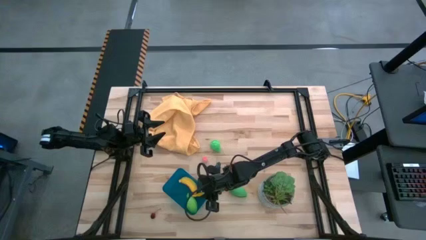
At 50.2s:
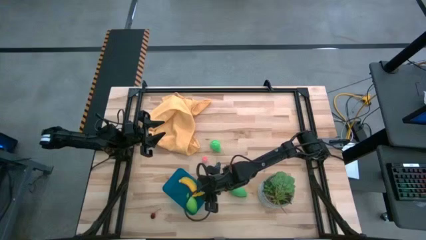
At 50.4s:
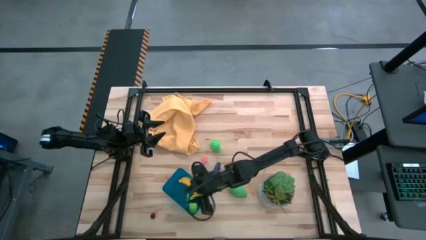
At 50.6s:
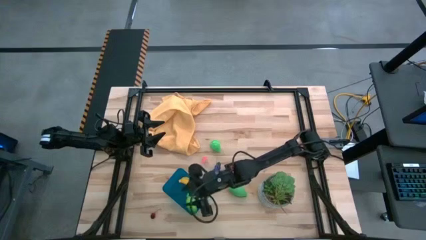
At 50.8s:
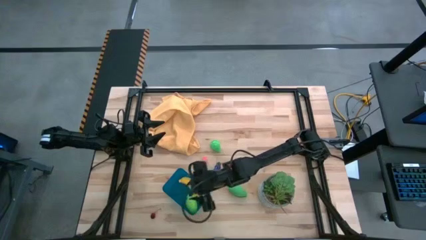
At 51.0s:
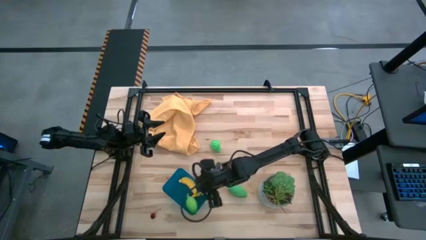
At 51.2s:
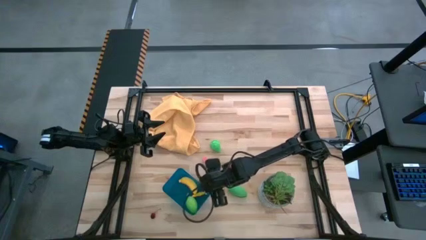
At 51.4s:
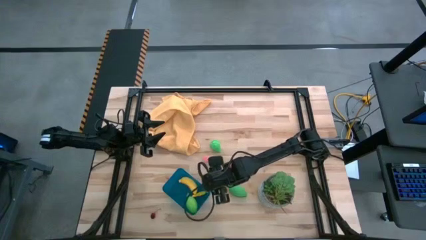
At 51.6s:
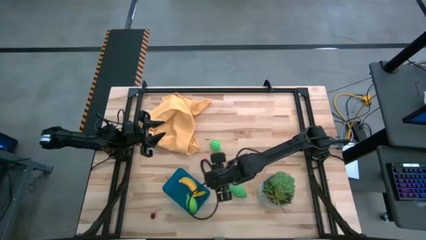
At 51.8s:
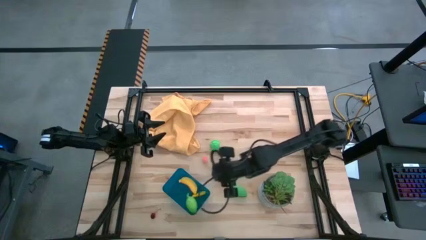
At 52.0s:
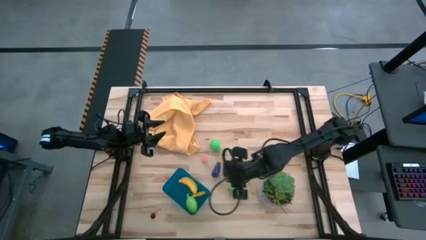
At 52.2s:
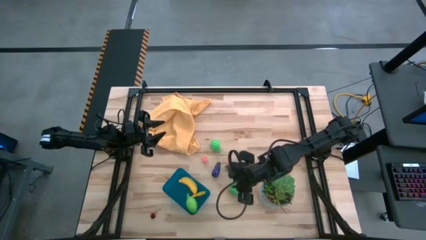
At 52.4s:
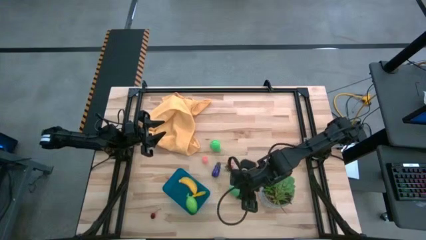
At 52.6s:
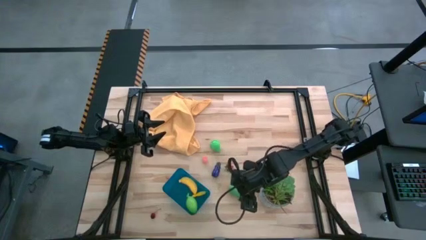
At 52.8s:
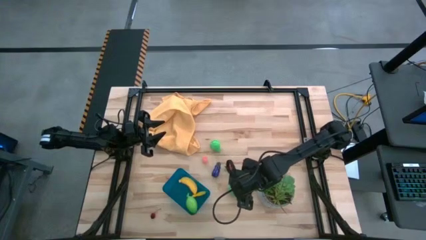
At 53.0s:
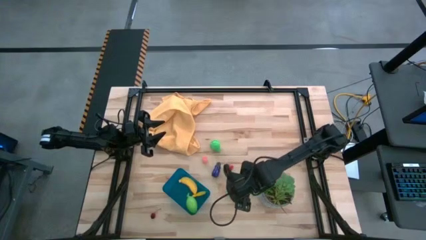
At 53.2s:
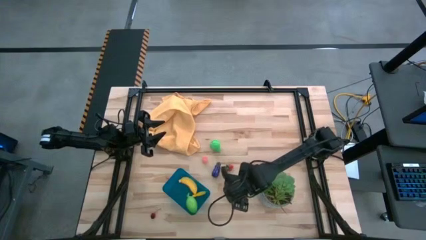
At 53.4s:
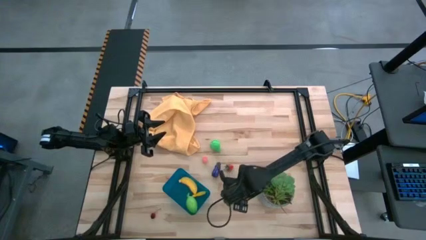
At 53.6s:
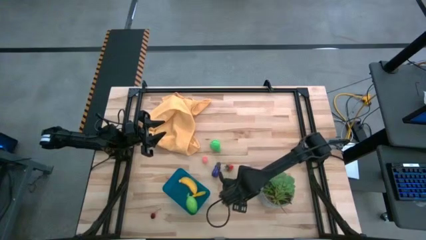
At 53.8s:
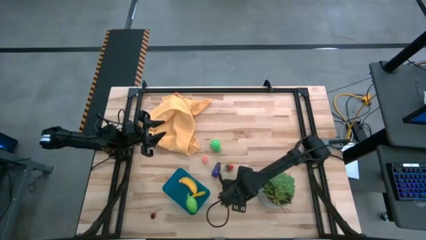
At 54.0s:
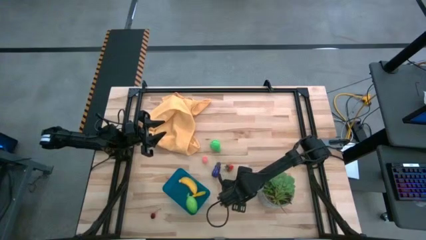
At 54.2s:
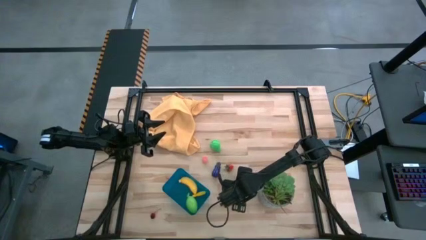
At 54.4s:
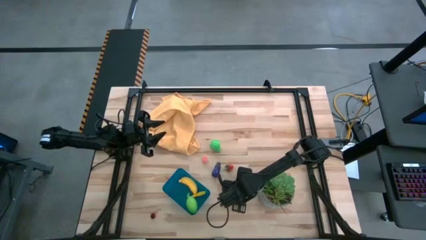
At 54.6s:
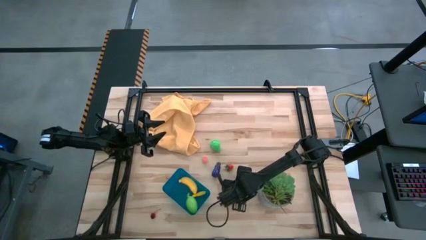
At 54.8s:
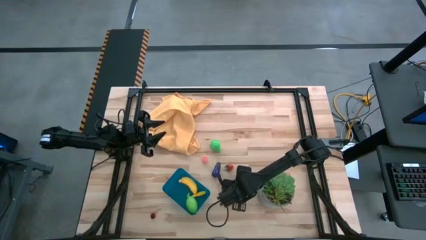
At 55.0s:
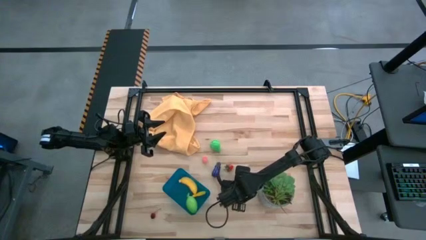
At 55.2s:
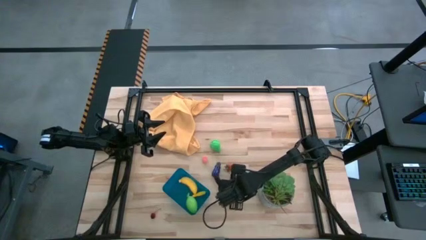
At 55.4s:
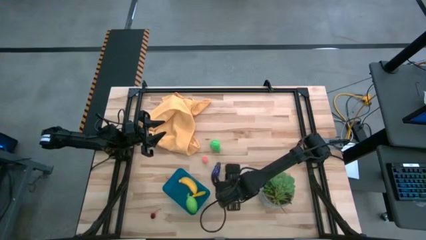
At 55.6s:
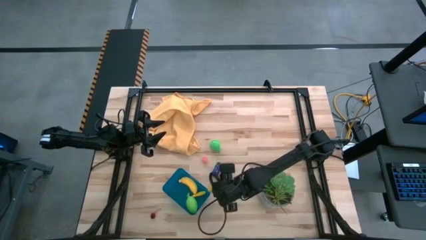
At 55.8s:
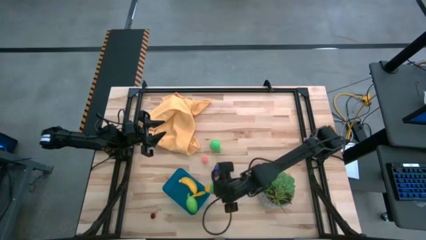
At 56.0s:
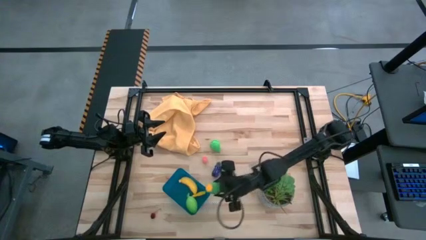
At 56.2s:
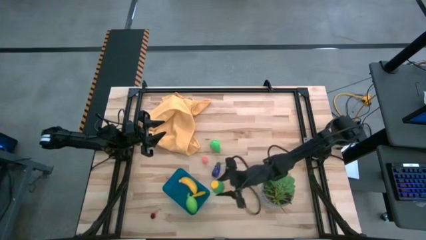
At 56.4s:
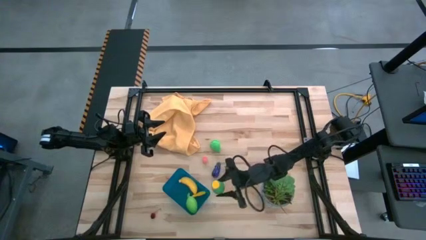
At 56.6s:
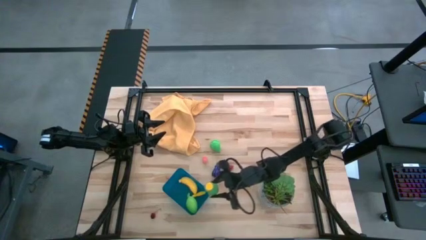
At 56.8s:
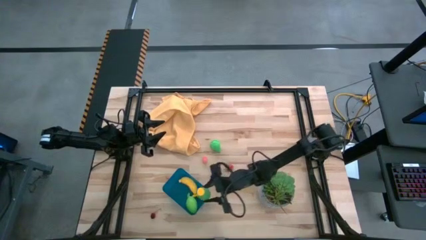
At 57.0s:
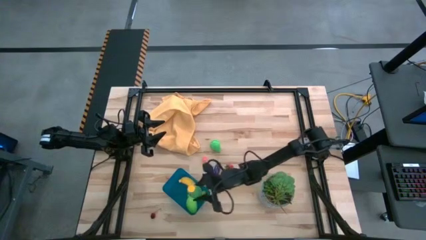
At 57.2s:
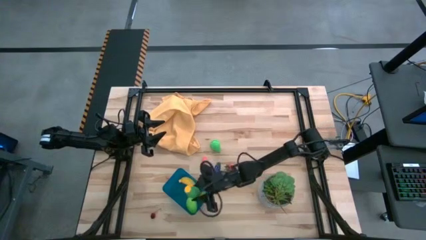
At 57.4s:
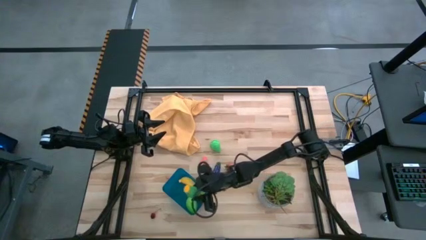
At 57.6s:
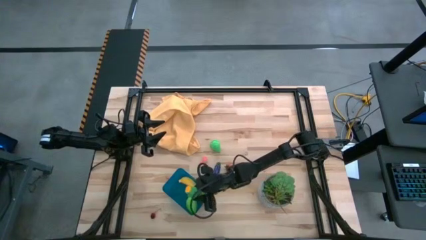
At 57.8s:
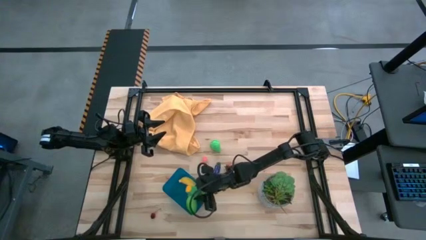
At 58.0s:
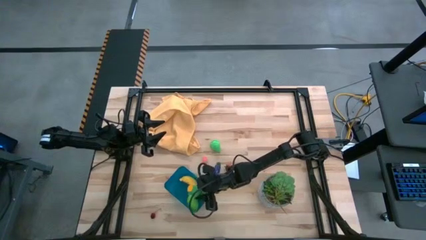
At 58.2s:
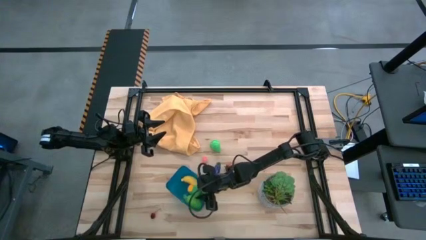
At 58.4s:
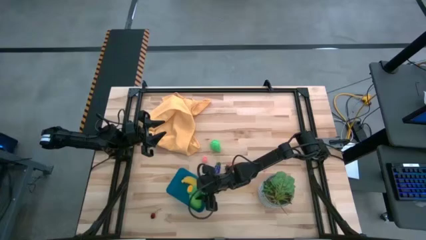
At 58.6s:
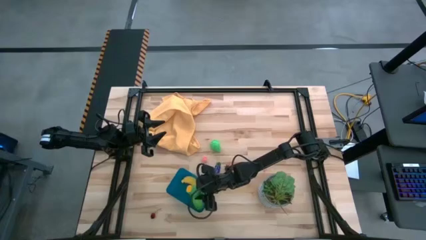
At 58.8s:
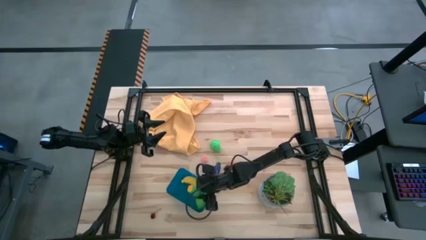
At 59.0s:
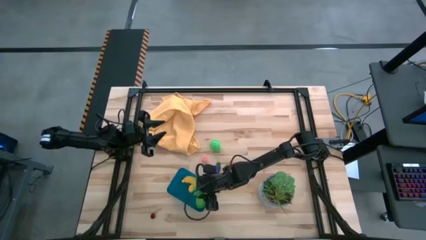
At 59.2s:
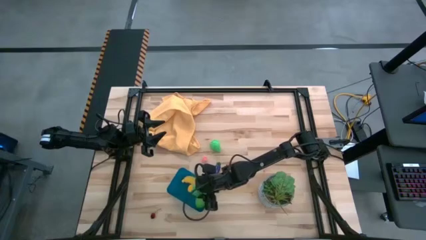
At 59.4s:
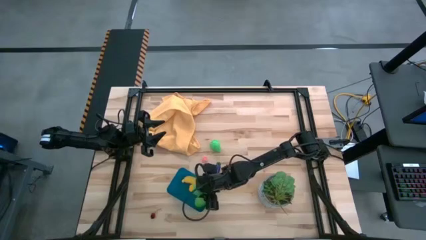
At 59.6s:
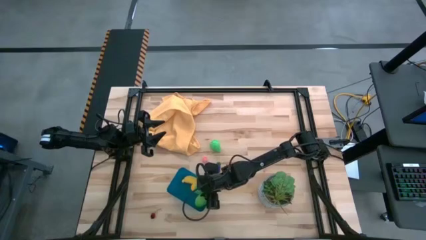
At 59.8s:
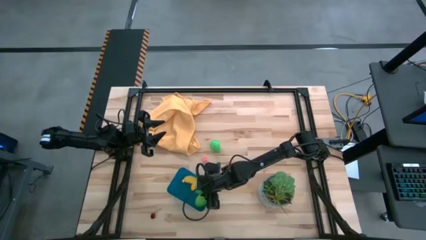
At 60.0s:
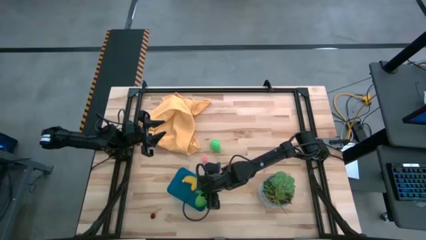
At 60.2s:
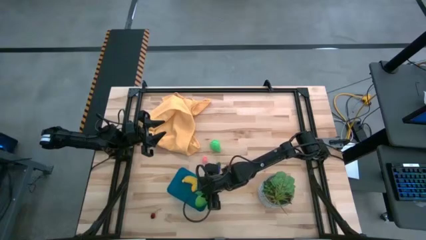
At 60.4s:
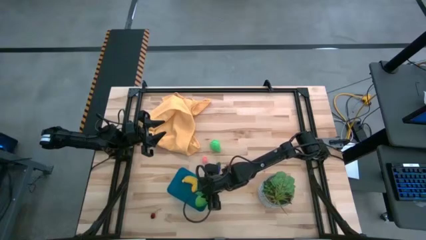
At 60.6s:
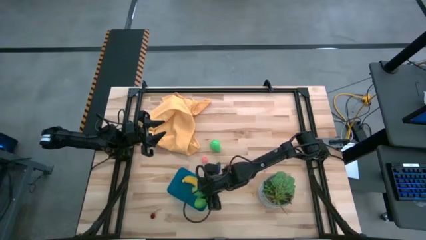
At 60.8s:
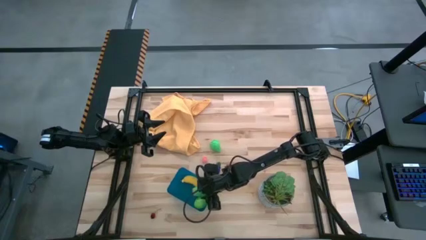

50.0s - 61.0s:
Task: Pick and placing Produce into tupperware
Put the green corn into the blue bin

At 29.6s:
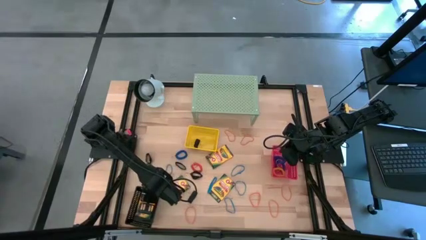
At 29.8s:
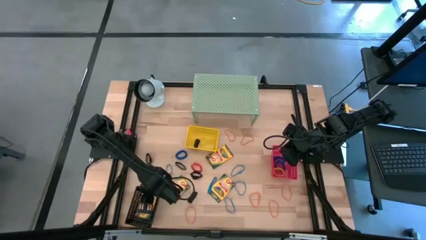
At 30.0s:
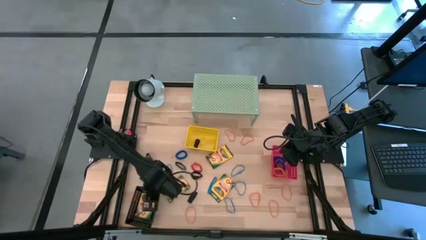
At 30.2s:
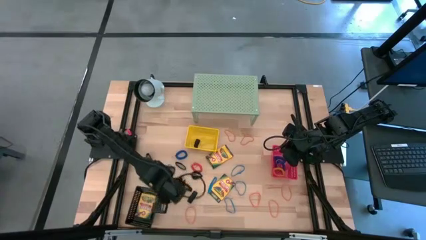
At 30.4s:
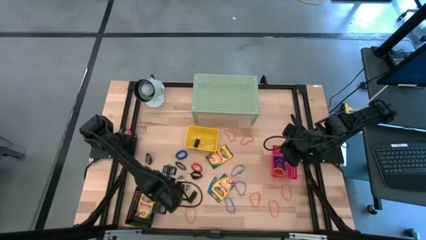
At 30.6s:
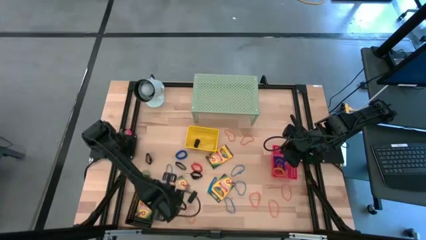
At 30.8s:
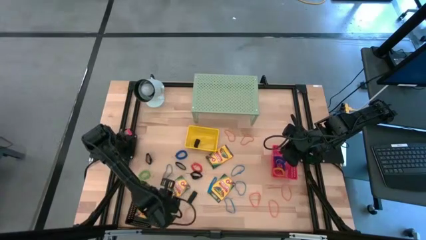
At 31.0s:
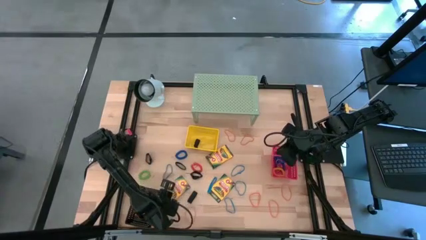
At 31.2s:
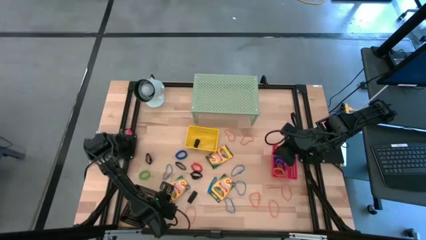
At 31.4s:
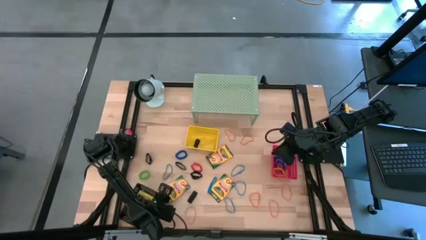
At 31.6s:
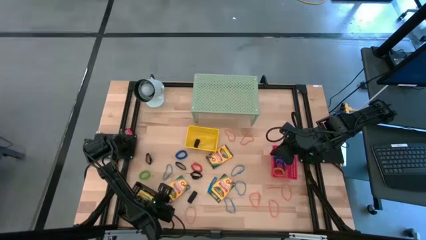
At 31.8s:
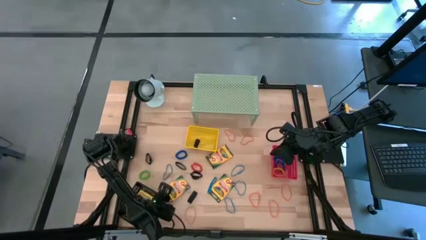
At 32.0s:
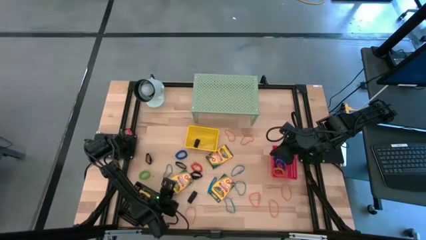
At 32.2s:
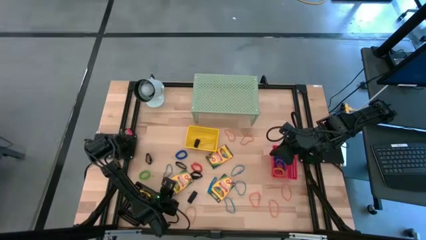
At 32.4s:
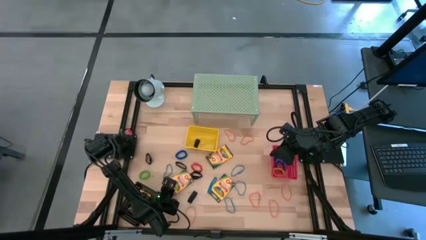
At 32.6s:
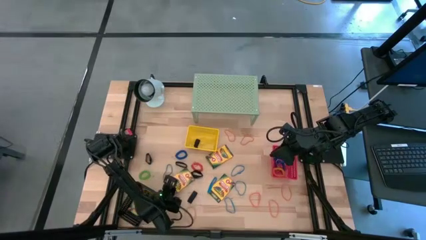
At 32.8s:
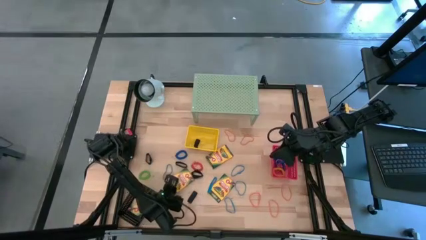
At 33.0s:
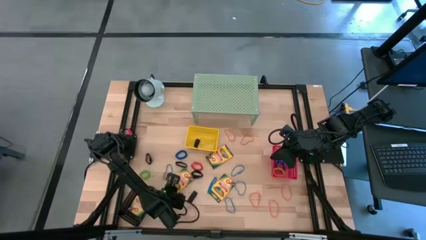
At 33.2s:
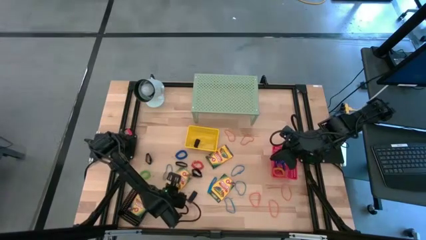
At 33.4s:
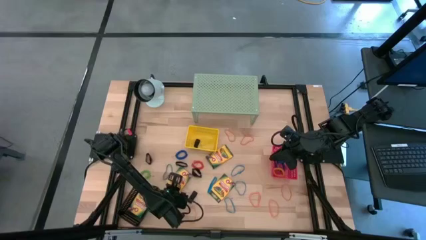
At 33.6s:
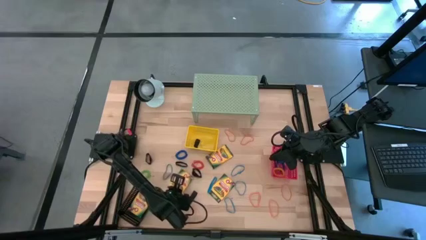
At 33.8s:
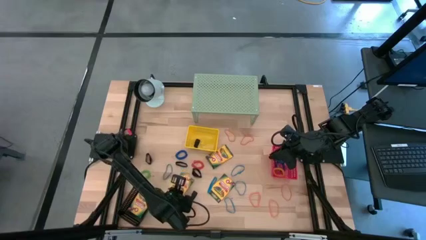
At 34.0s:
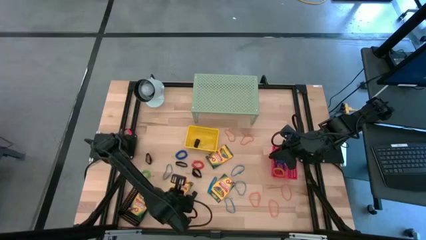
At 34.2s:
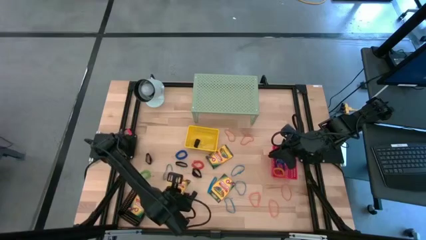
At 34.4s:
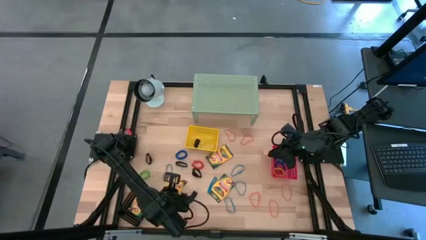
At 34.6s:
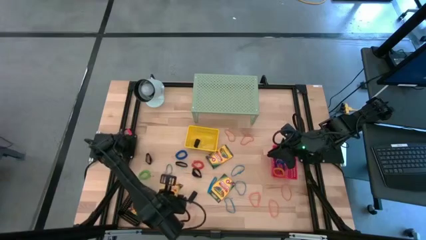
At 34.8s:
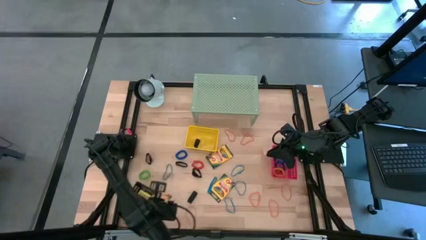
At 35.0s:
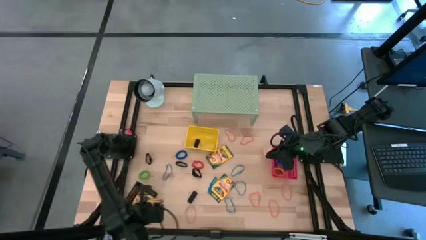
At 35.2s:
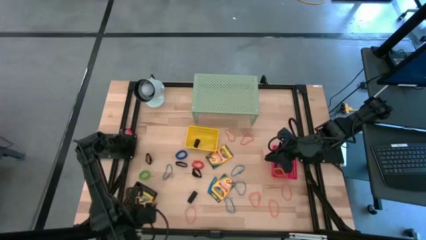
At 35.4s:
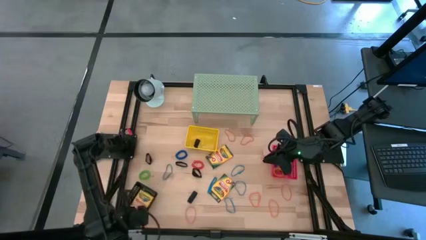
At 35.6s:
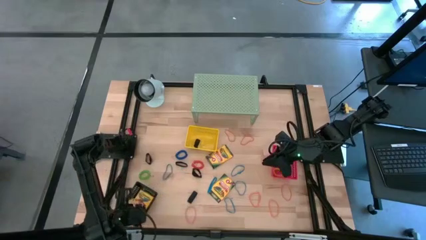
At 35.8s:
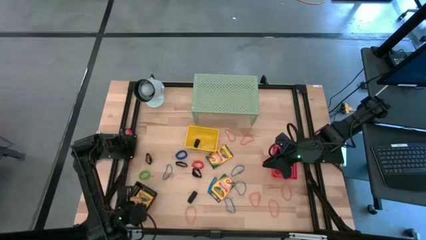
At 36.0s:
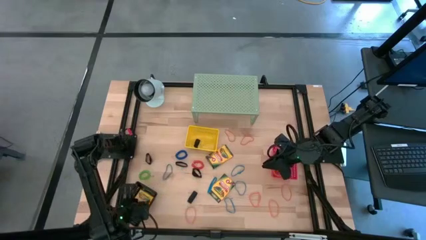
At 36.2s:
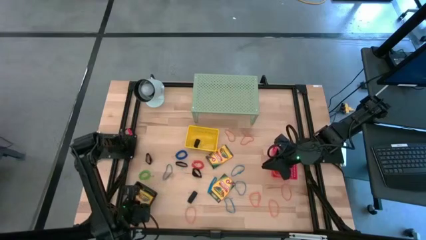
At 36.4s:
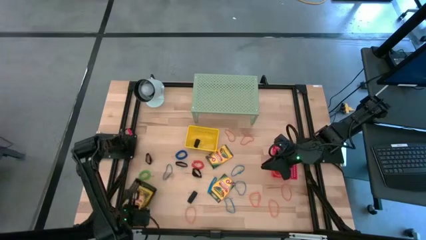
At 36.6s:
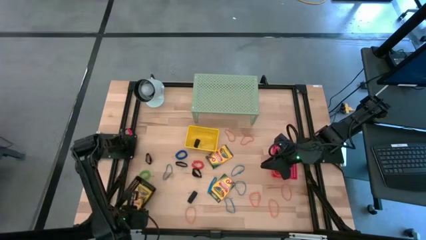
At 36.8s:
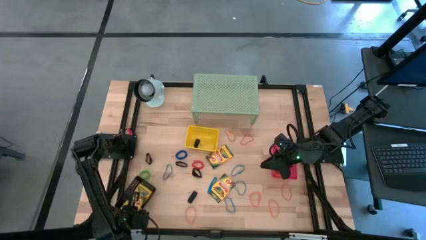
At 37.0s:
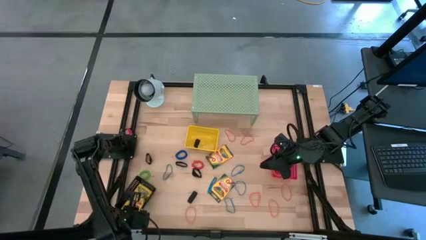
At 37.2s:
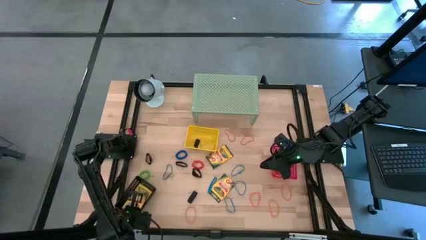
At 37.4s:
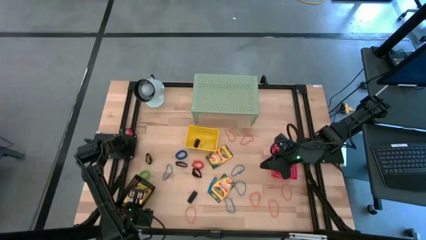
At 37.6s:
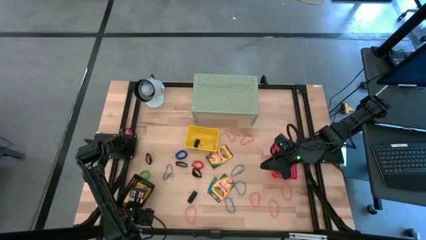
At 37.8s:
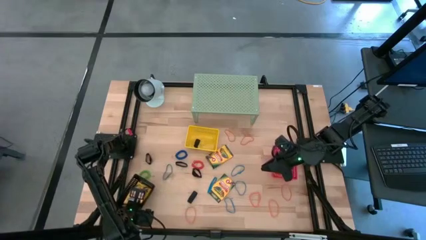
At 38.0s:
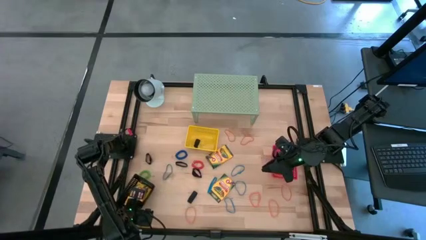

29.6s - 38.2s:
Task: Pick & Place Office Desk Supplies
Put the crayon box into the black bin
